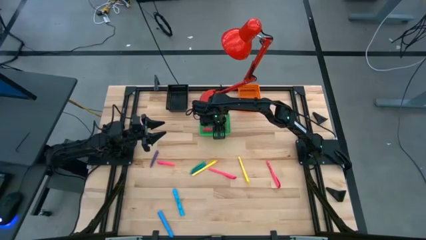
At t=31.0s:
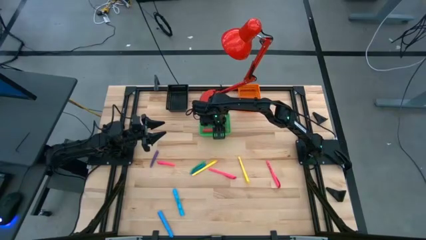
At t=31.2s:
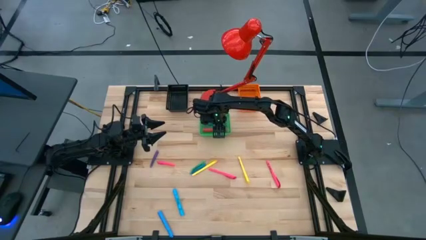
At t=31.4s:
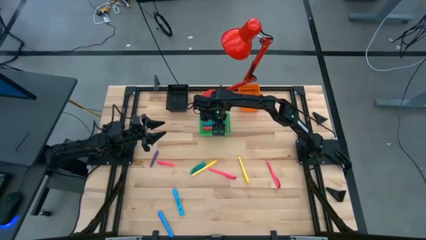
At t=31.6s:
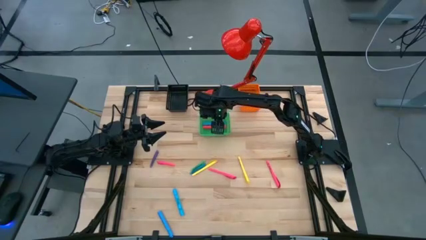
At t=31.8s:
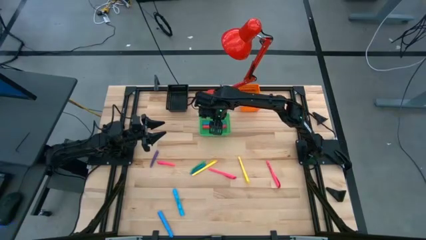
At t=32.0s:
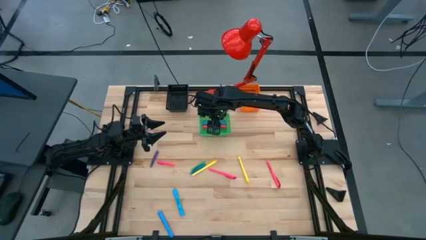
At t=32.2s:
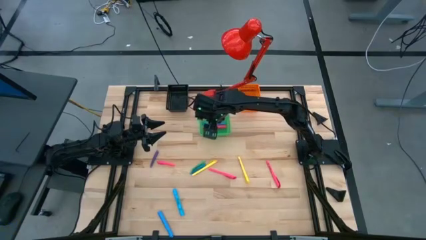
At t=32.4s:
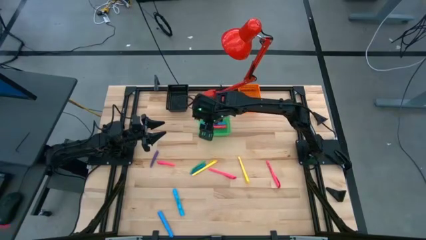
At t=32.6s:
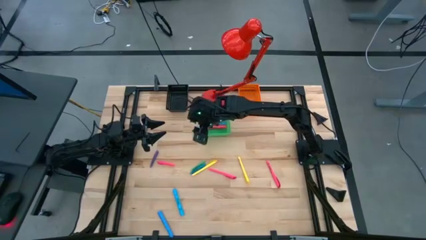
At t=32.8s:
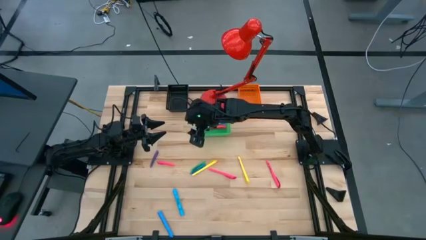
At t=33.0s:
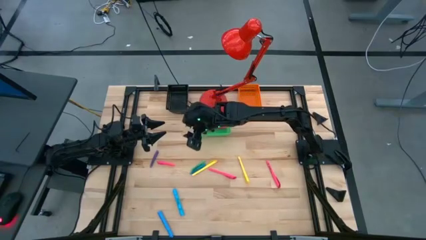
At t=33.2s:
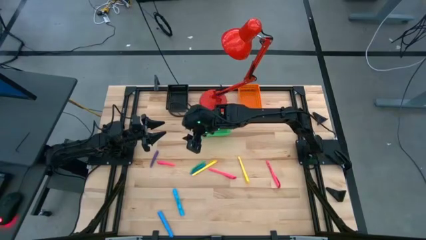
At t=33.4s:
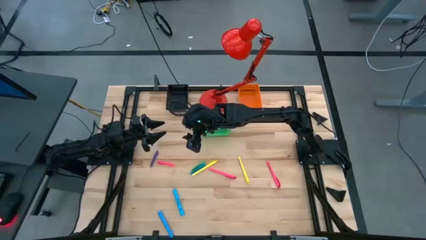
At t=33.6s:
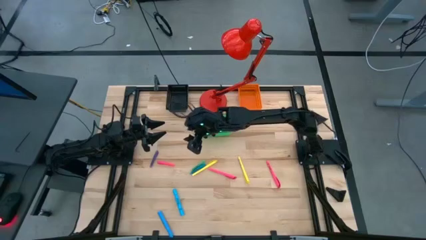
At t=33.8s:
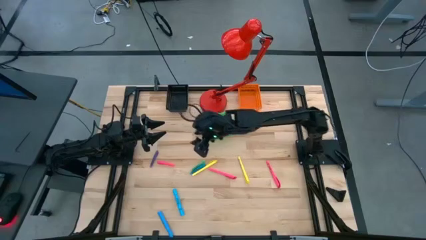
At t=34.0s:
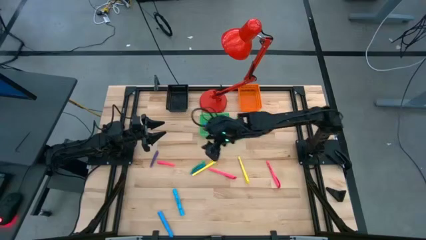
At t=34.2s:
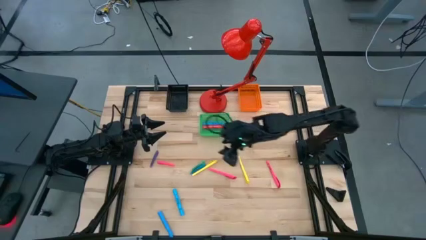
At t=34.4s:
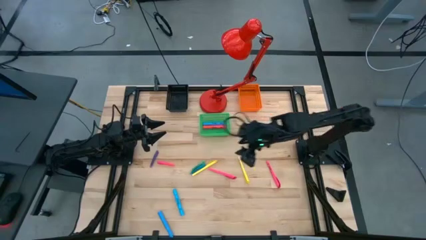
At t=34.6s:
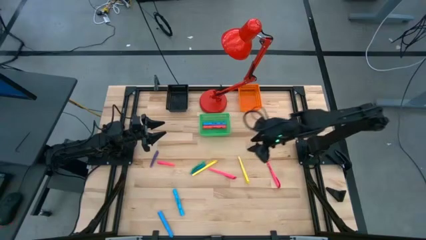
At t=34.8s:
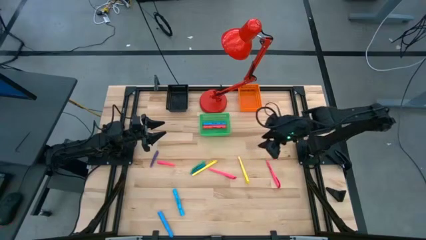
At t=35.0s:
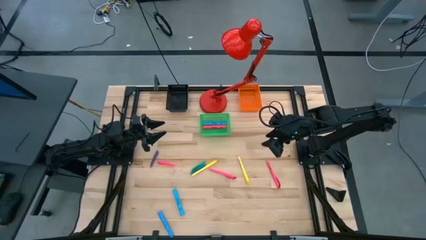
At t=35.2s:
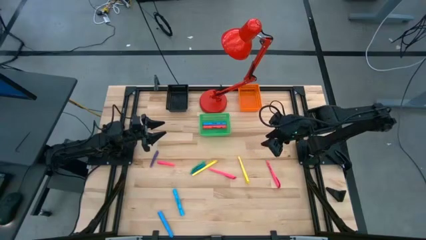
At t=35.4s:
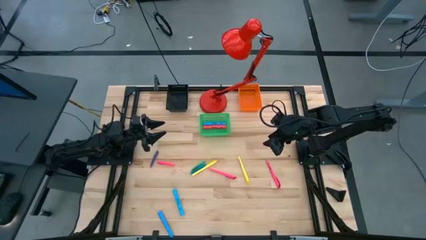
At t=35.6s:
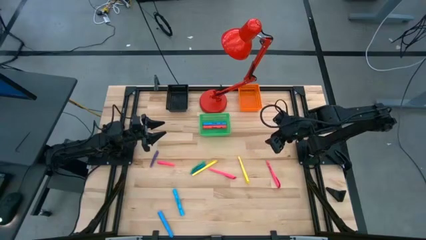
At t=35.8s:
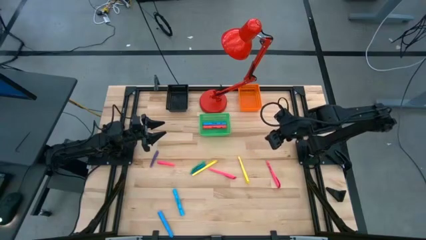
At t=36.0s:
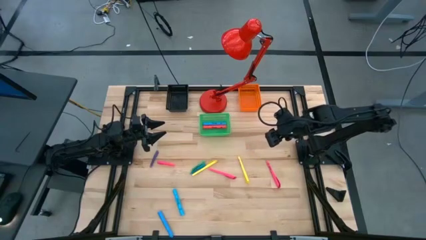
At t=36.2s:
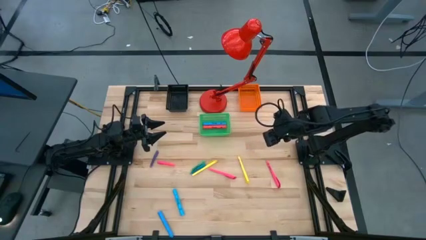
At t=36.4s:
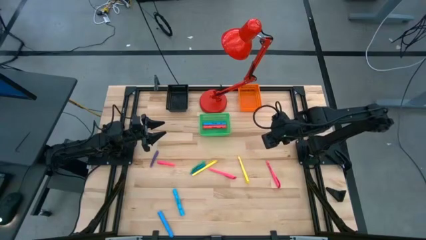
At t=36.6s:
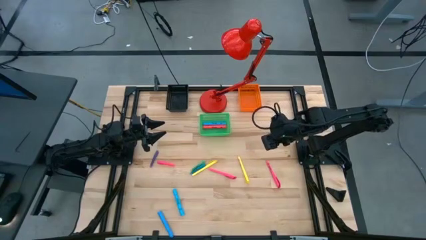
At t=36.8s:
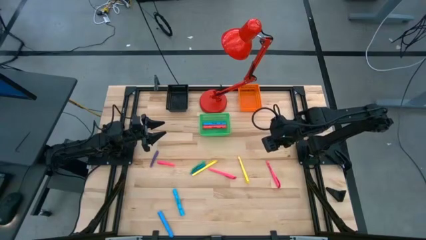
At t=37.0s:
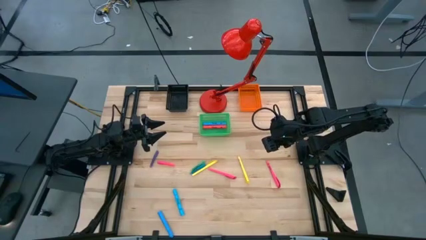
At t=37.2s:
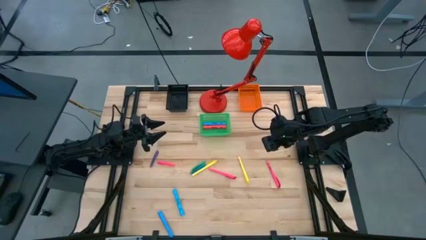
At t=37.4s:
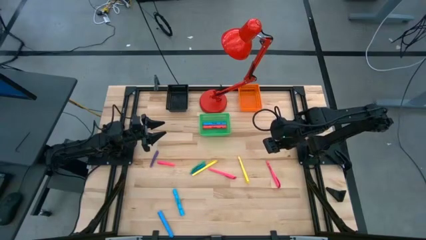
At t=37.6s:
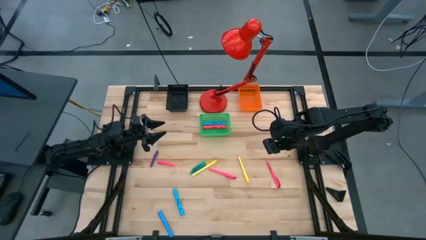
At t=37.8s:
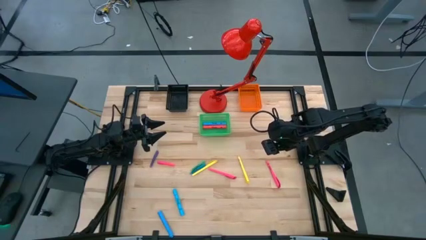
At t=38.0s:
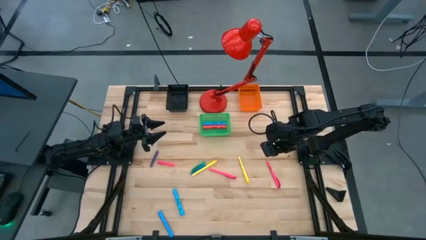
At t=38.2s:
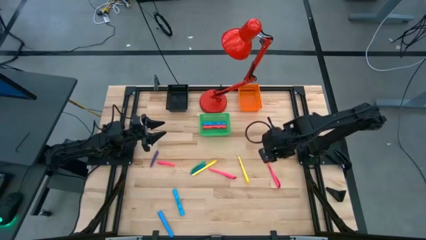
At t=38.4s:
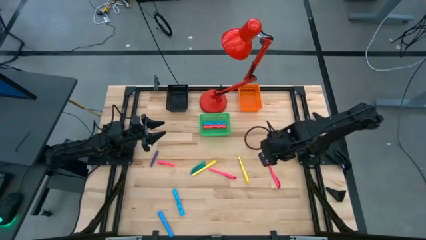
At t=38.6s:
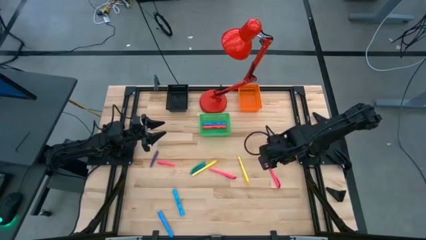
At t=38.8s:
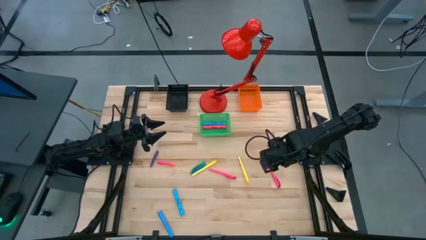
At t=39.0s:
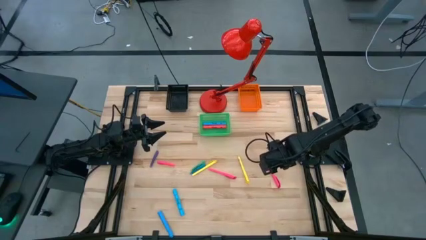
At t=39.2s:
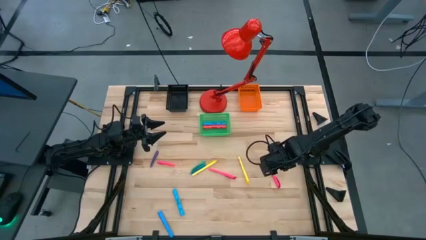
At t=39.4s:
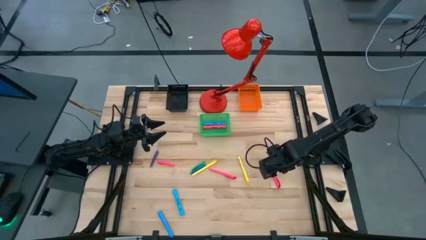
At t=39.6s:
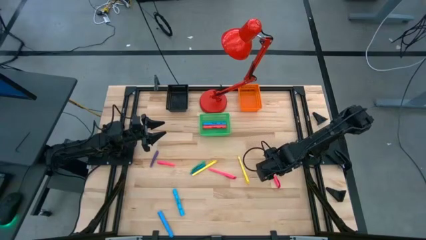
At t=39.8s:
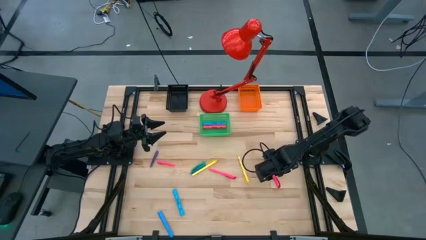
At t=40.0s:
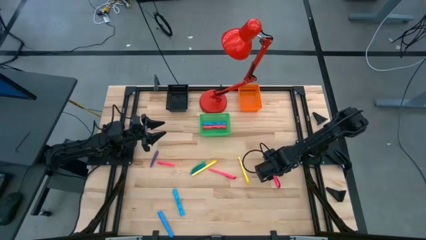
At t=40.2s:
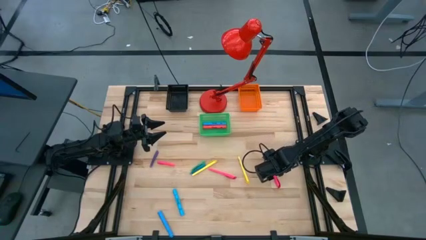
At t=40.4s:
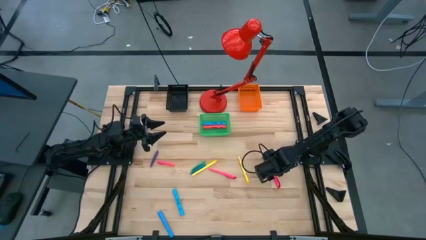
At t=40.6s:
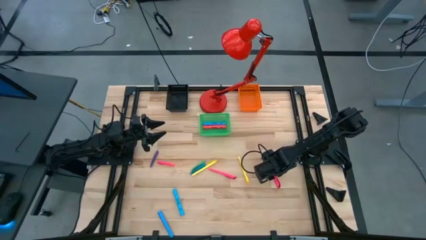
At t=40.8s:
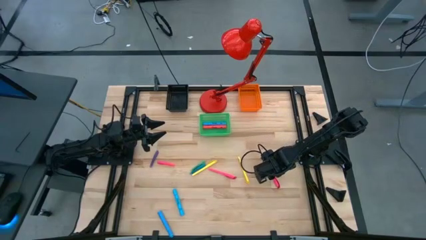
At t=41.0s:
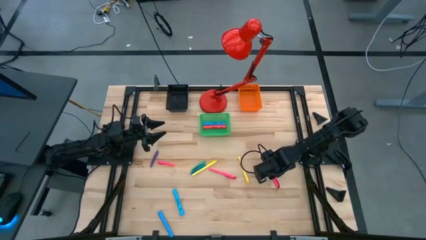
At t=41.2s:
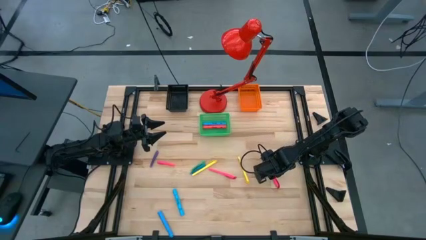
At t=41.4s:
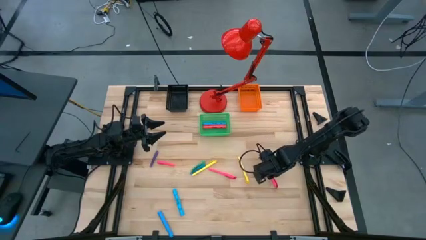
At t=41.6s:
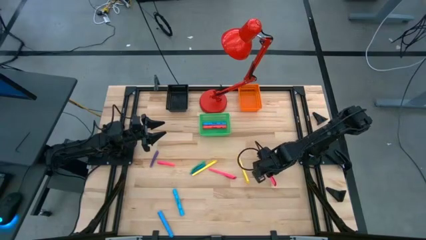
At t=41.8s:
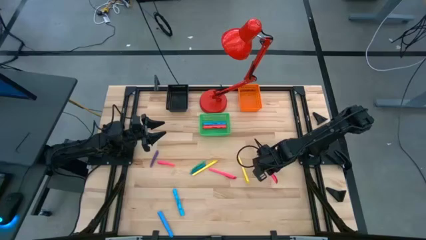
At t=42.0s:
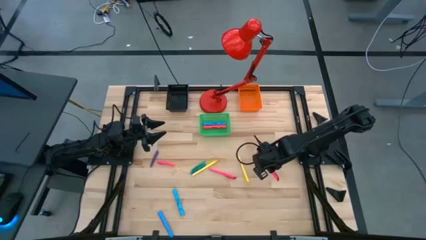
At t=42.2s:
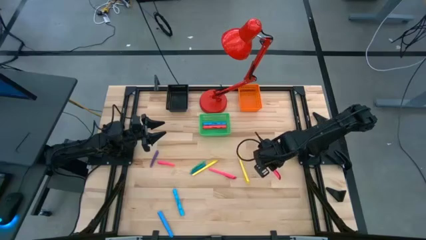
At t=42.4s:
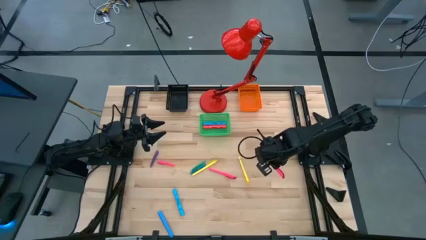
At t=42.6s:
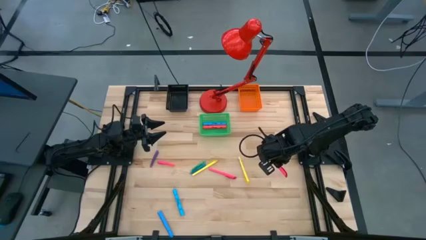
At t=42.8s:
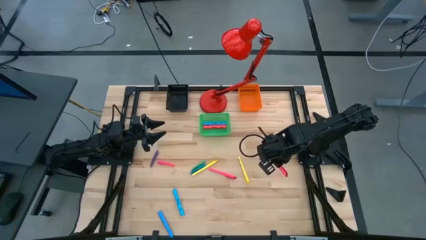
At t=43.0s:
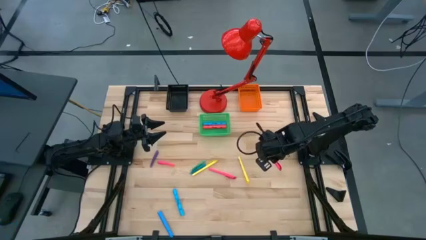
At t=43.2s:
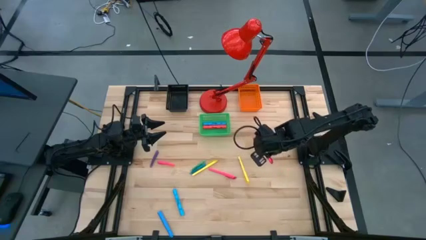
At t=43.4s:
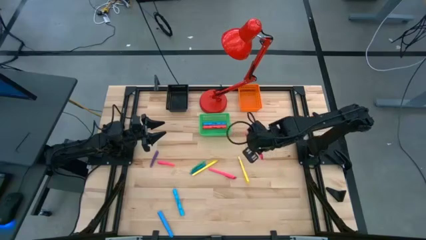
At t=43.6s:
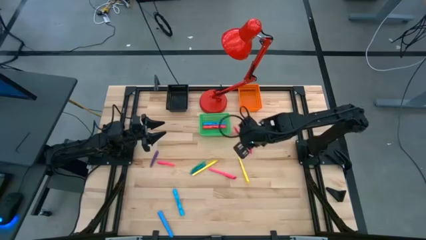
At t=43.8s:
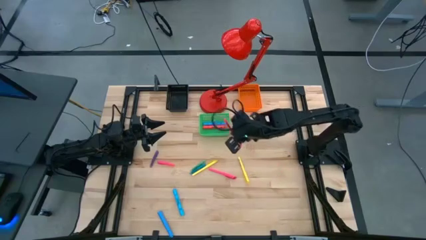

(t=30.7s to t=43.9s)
Task: Pick & Place Markers
Put the pink pen into the black basket

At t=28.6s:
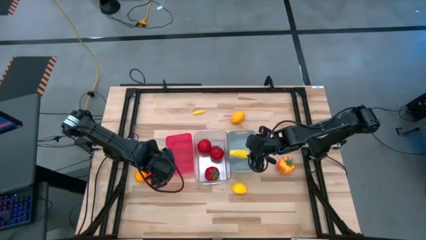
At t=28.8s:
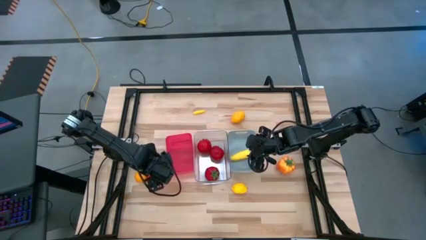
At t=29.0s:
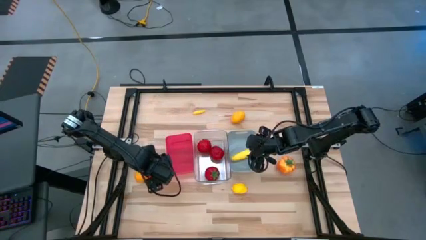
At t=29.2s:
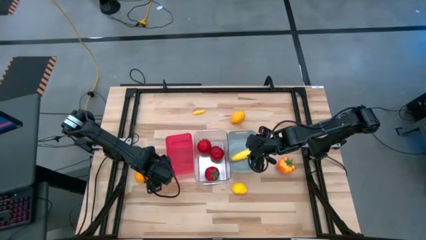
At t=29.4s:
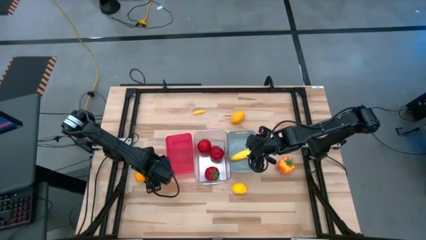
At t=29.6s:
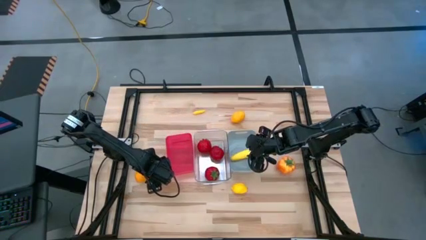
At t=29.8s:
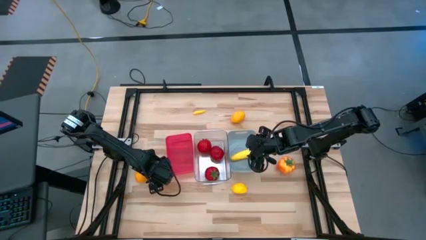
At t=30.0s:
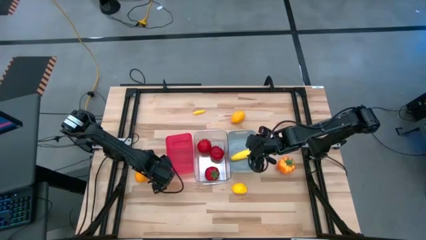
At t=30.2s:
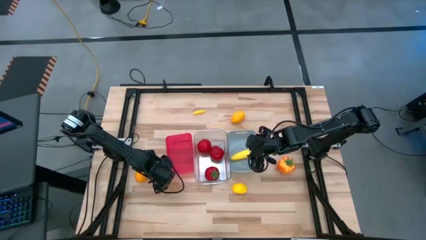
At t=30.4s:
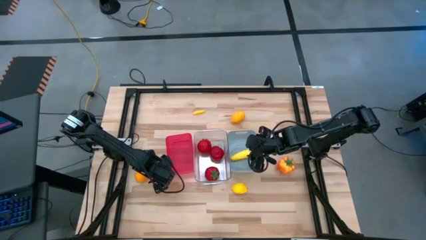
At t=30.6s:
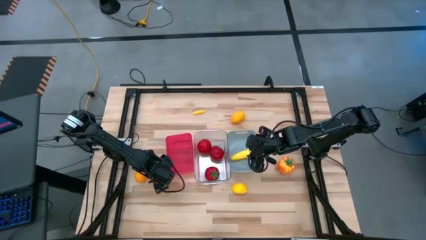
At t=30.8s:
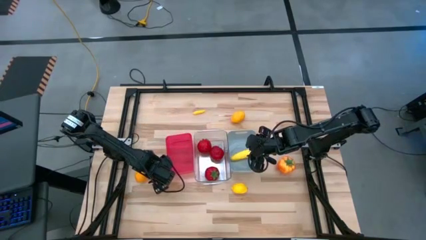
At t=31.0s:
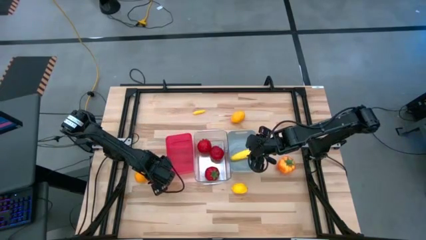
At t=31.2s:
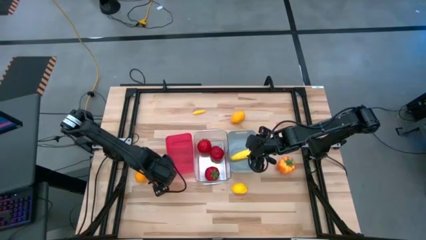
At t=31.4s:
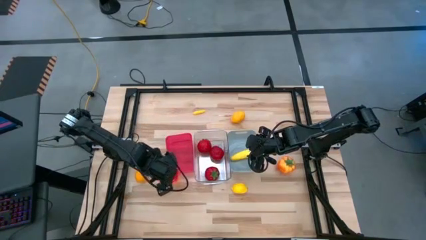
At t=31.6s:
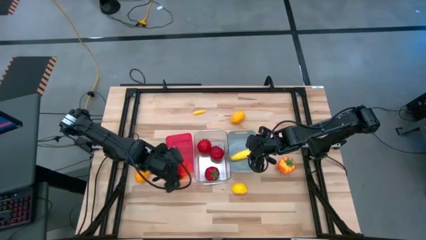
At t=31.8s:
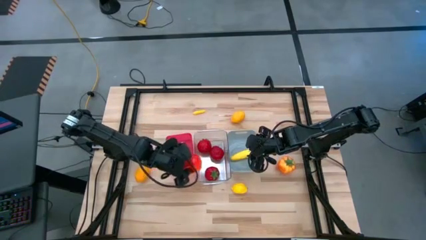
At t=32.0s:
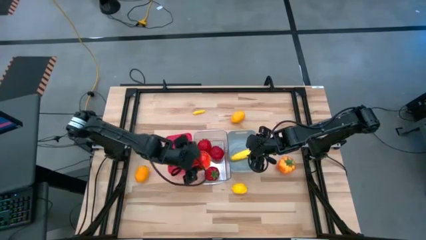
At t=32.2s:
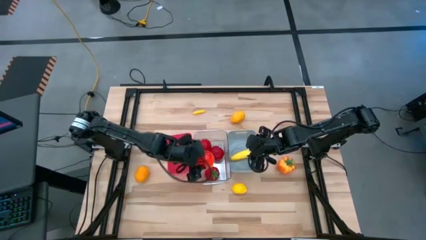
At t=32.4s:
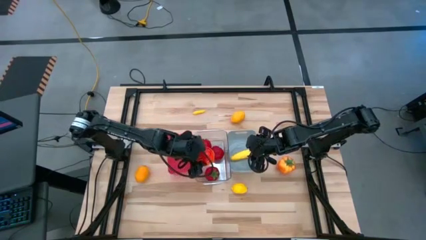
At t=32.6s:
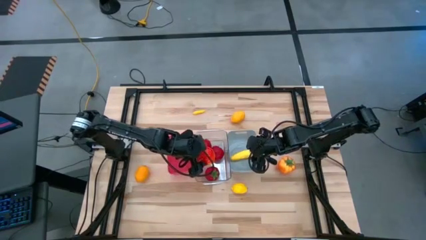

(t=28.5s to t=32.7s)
Task: Sort produce into baskets
Put the left orange tomato into the transparent bin
